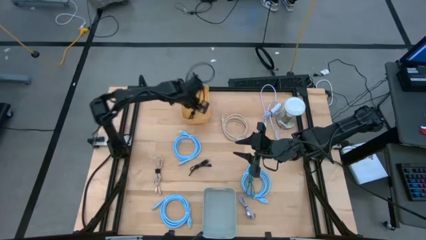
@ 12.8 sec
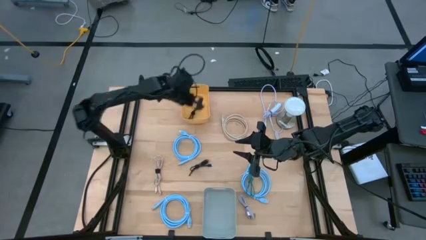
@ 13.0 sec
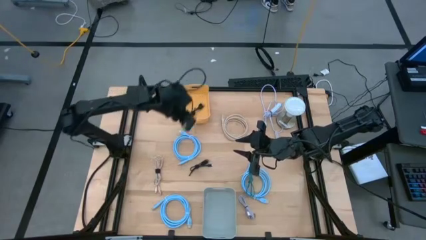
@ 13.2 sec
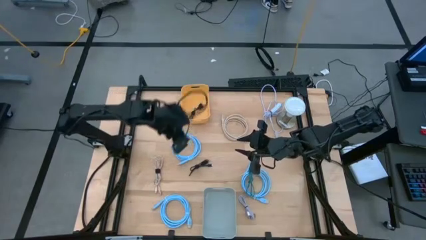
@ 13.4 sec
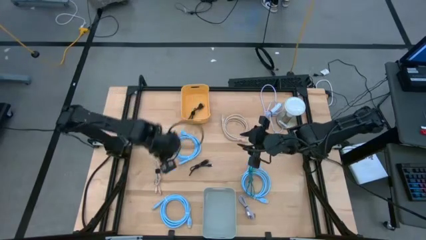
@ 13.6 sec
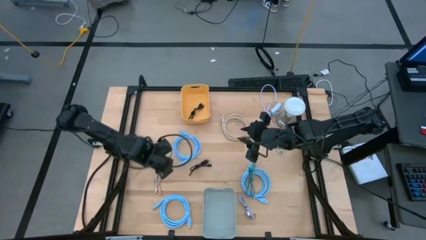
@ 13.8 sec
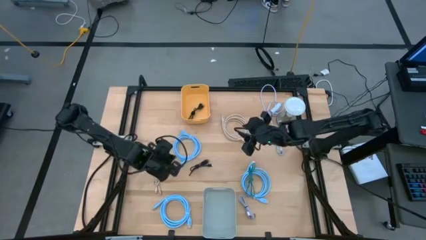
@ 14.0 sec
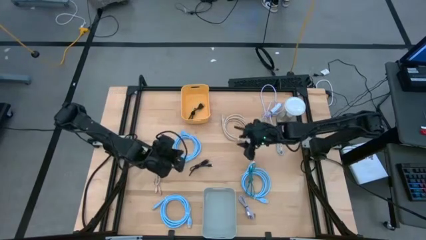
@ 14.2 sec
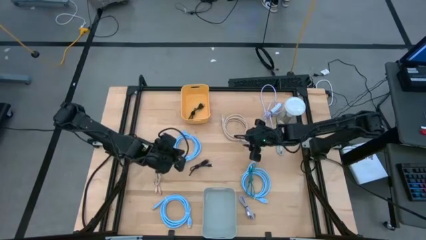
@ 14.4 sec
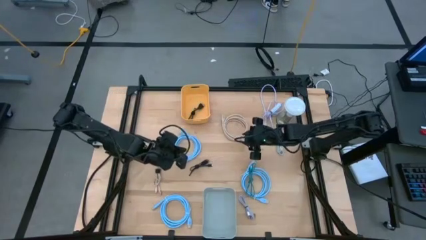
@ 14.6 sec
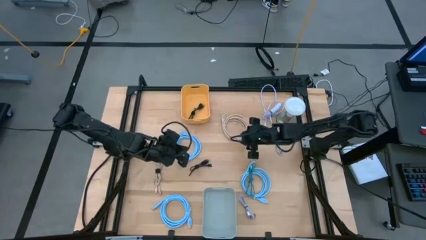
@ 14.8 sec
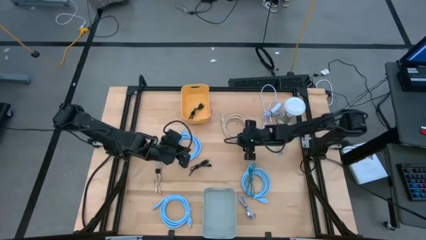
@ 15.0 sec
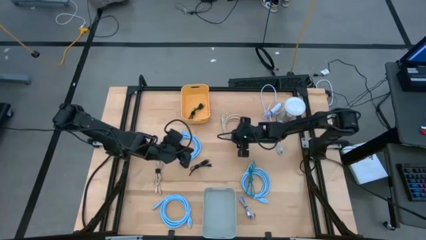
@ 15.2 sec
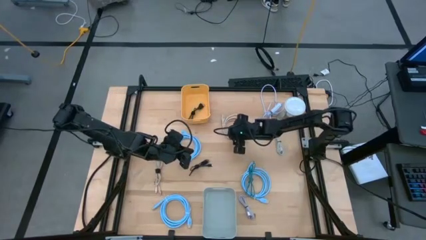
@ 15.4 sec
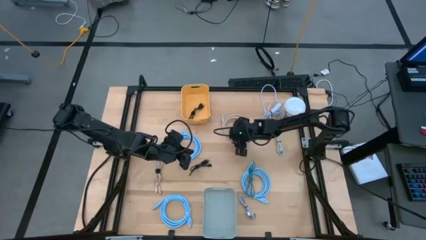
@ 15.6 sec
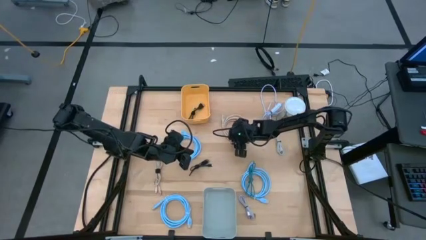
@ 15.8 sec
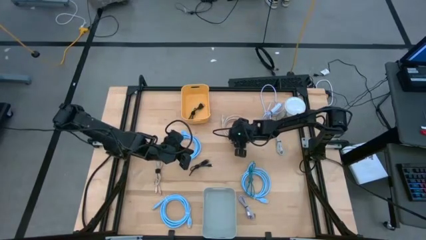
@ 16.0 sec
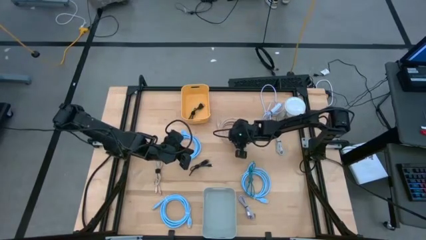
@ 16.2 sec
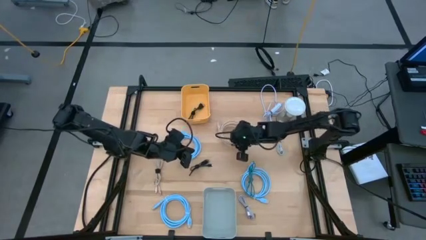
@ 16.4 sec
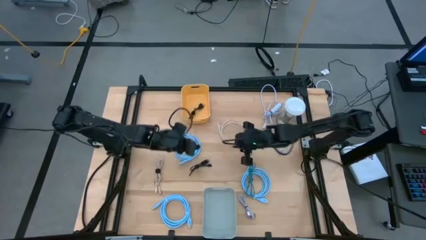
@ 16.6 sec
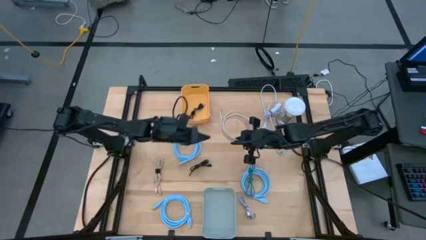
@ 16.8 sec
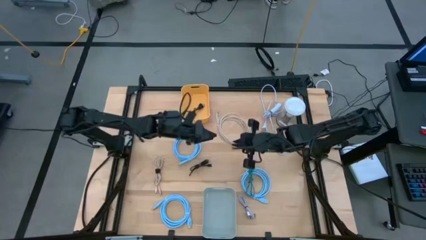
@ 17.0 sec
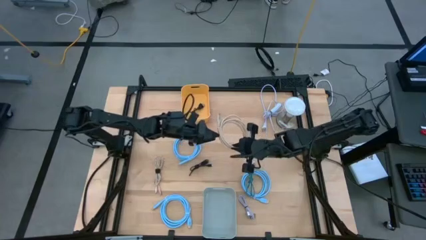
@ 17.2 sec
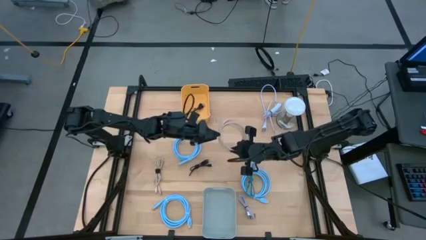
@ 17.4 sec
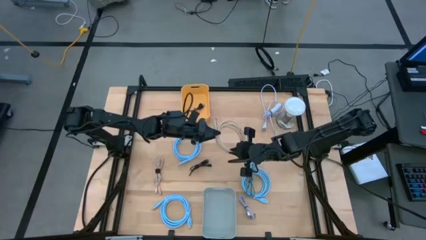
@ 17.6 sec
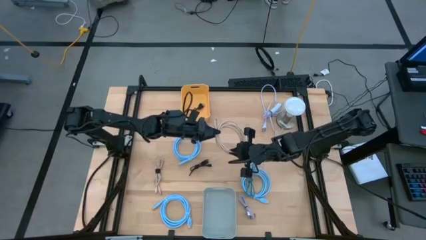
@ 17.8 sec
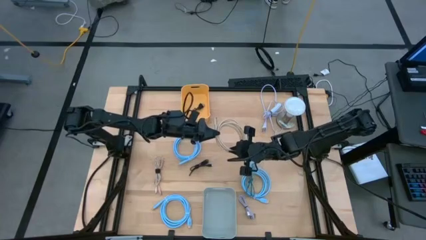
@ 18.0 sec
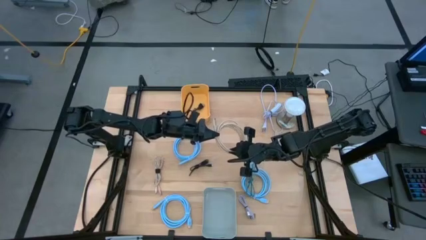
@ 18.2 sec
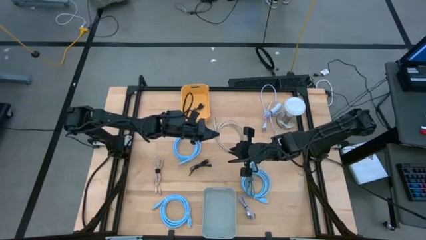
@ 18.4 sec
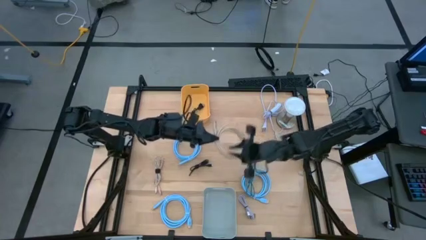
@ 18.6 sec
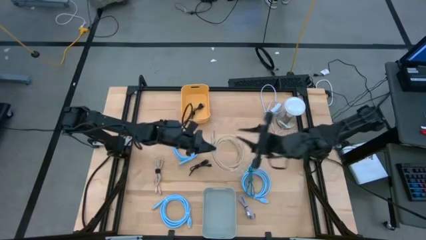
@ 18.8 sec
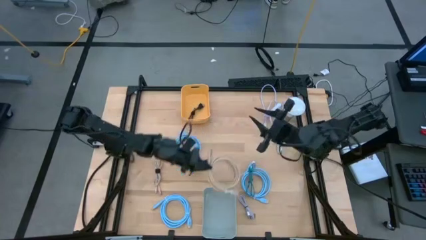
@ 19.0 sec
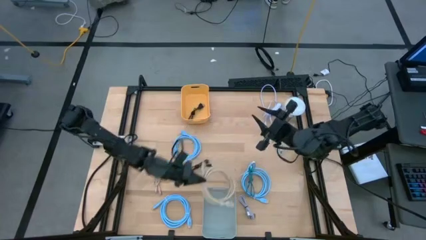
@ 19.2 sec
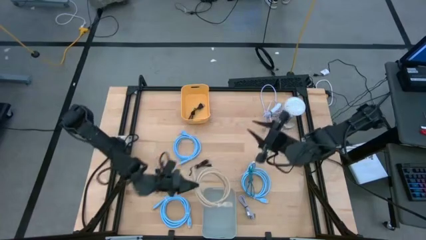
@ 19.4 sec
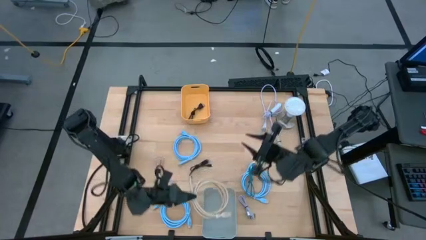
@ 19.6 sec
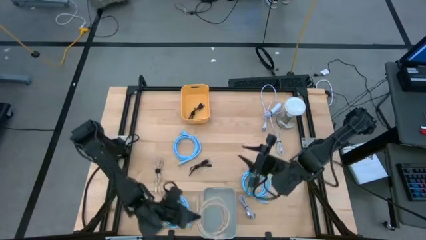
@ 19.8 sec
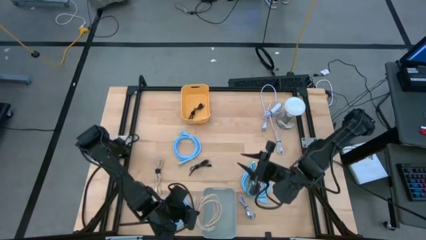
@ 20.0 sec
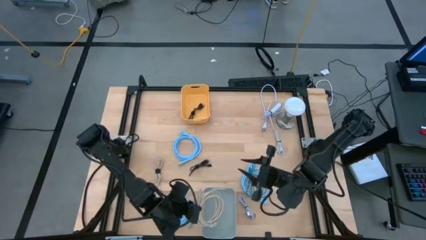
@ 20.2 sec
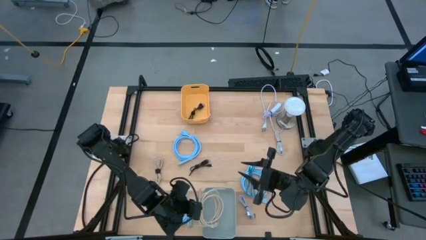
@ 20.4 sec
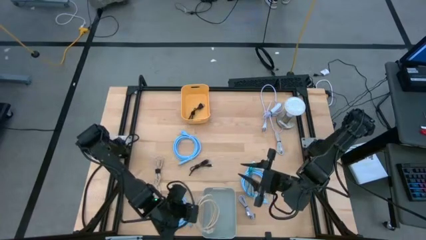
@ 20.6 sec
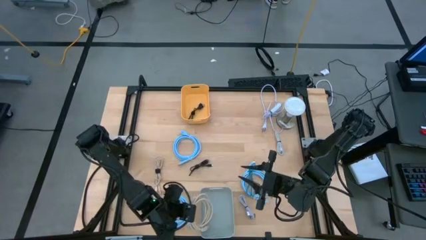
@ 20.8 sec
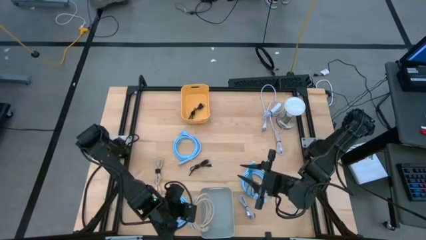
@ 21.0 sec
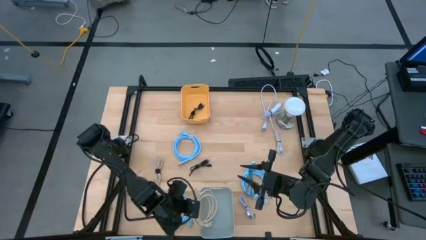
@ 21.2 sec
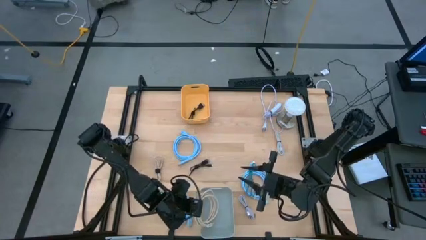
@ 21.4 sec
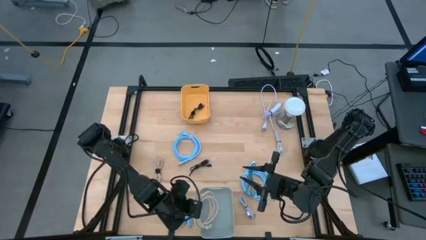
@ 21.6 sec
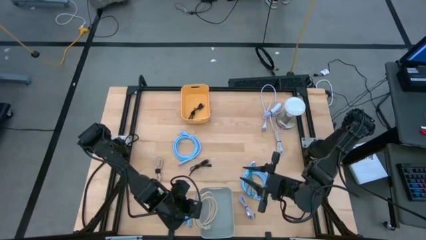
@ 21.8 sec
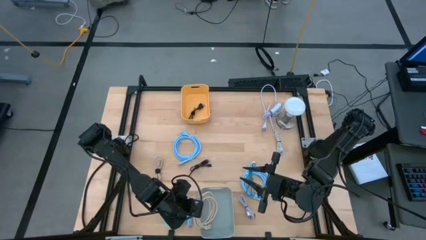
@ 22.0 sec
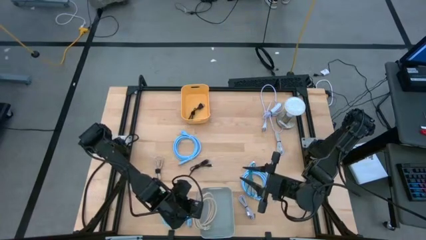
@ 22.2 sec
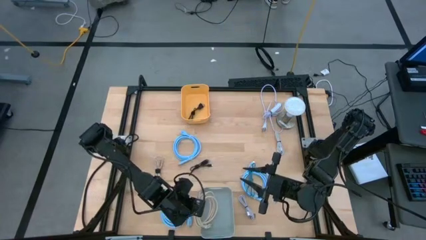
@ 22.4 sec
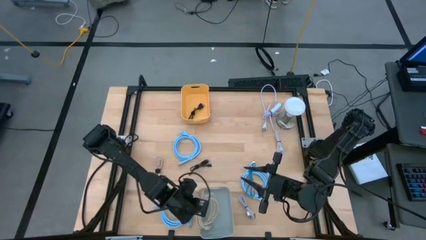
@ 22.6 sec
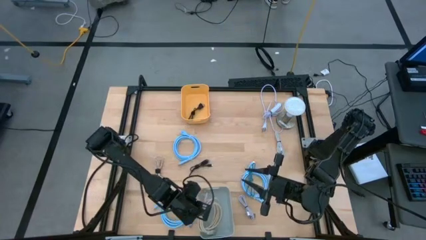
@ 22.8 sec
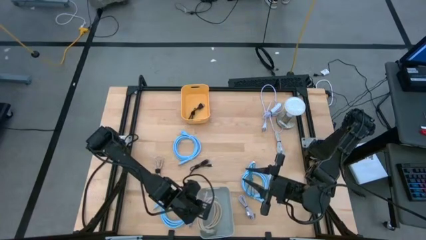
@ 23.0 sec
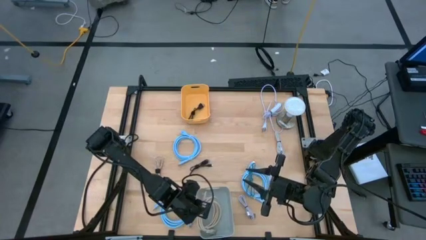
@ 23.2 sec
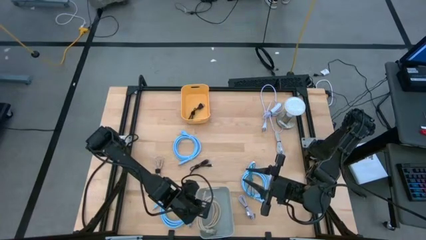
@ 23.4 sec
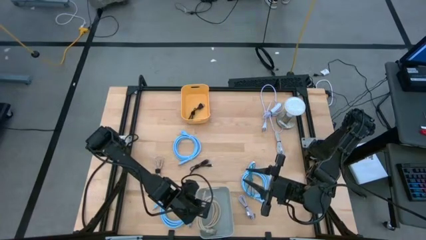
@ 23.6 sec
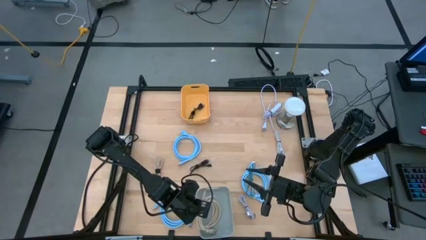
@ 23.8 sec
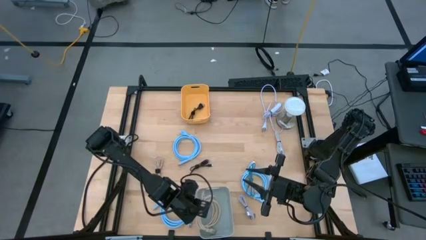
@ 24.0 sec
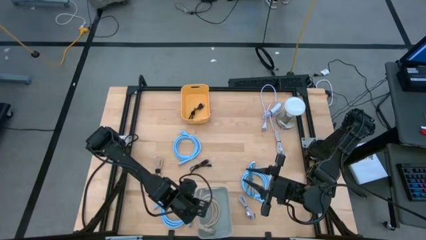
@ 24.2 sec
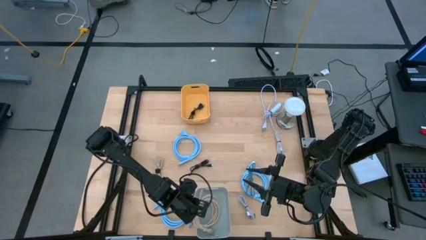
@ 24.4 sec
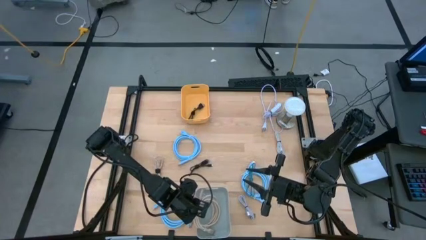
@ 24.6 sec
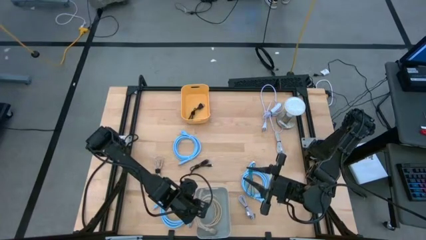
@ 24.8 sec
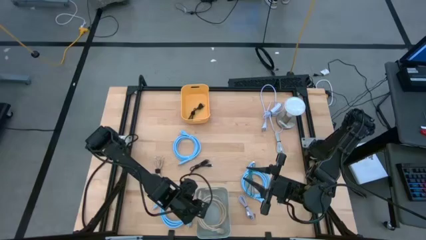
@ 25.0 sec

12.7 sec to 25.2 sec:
Task: Pick & Place USB Port
Put the brown video cable into the gray bin

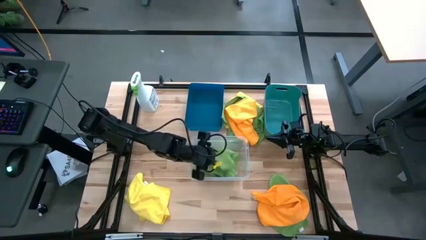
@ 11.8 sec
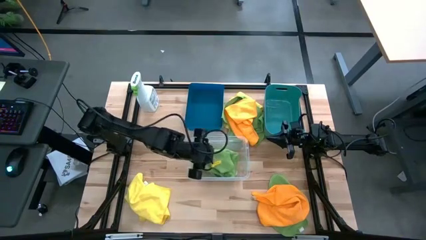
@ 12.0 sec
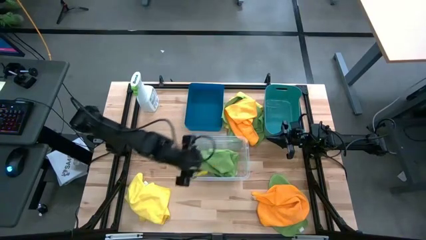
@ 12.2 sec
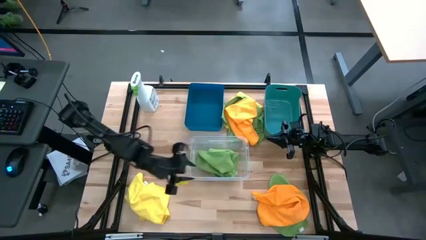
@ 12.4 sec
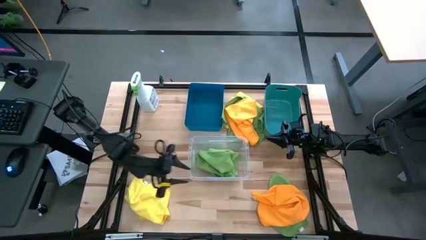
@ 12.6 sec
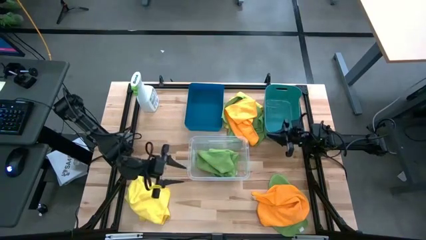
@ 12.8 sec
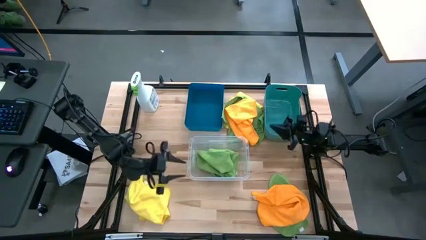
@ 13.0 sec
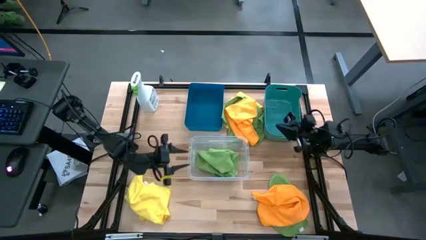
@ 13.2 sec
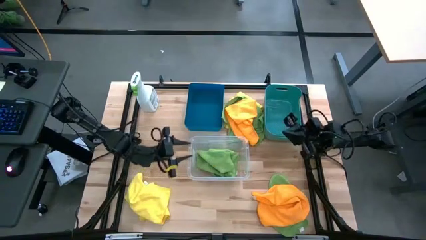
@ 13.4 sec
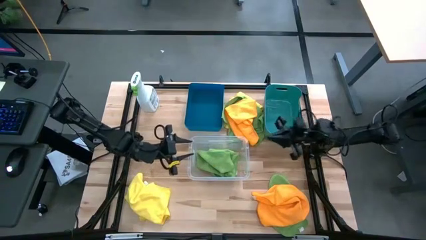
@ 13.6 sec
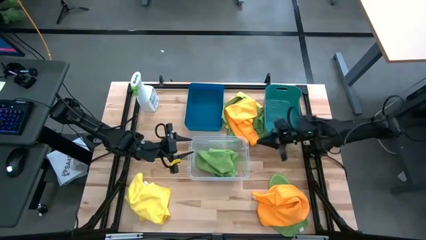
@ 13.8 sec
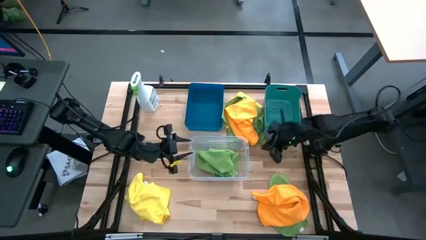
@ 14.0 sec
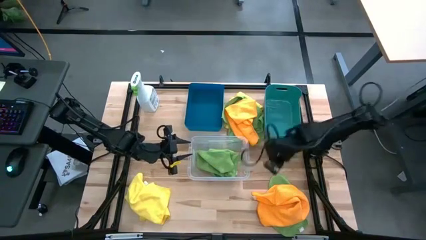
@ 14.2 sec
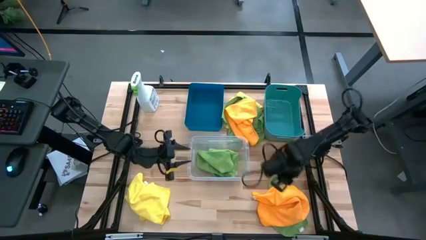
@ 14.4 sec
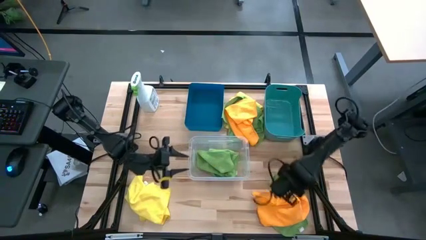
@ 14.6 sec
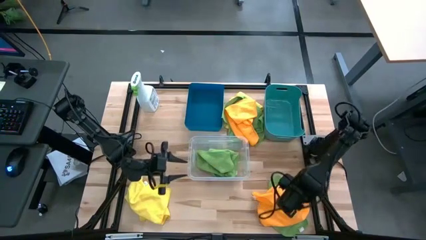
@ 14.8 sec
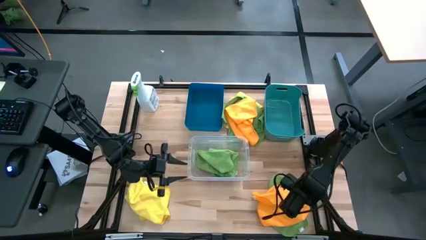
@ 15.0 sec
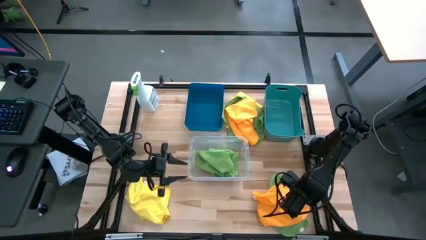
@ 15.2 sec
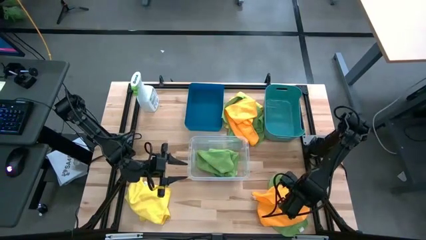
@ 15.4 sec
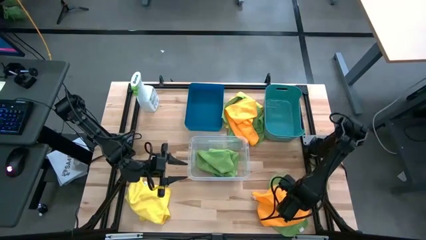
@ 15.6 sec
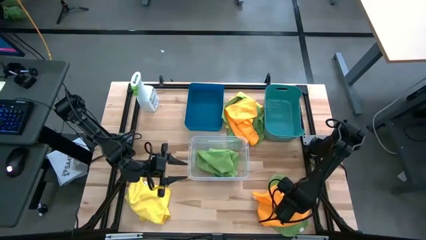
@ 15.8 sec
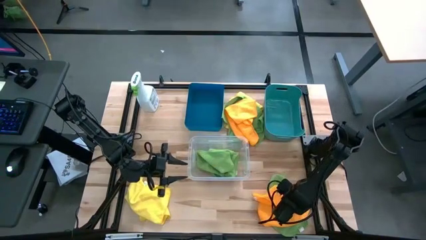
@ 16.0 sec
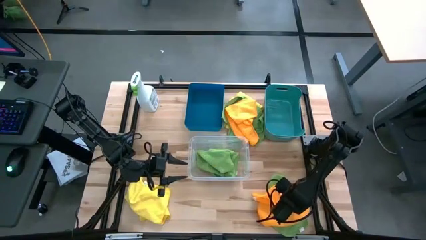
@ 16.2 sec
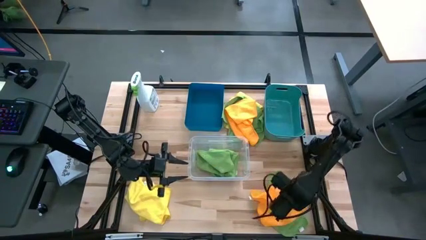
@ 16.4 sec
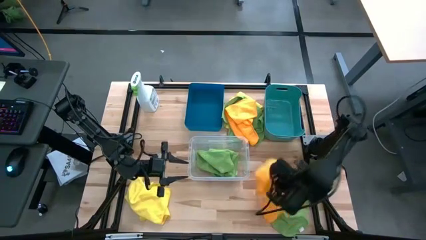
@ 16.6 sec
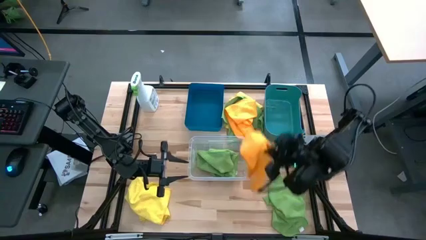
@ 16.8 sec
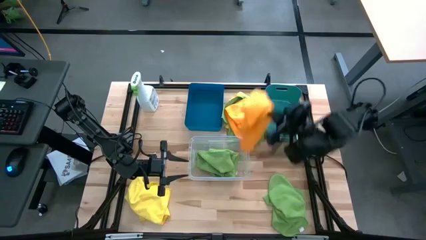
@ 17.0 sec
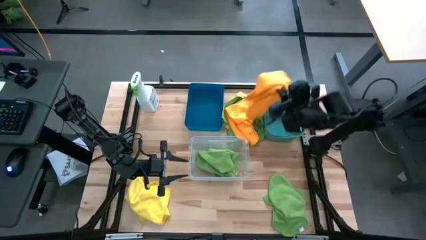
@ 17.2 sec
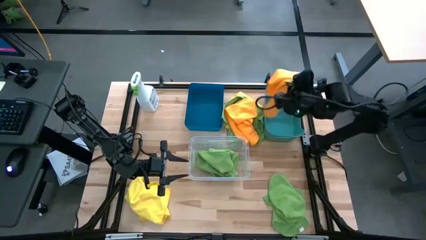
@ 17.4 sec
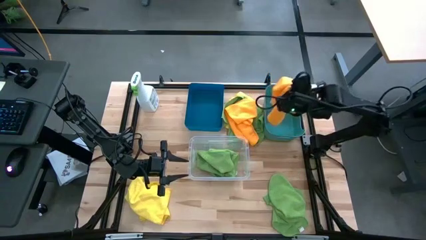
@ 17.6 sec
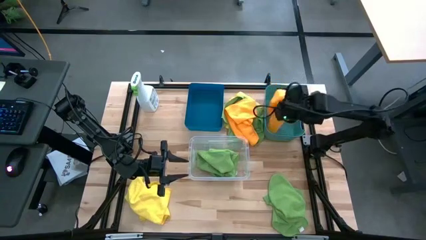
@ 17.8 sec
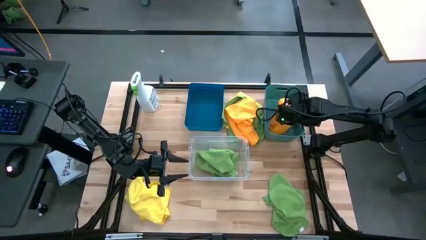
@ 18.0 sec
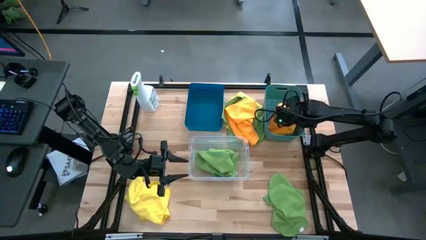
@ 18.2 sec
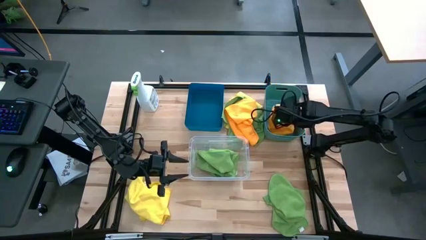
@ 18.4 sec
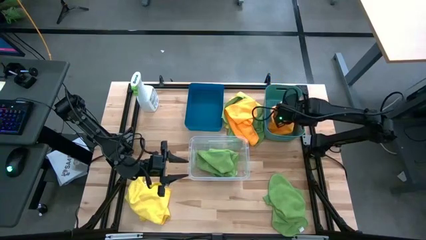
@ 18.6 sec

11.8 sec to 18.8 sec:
Task: Sort microfiber towel by color & place in baskets
Put the bottom orange towel into the green bin
